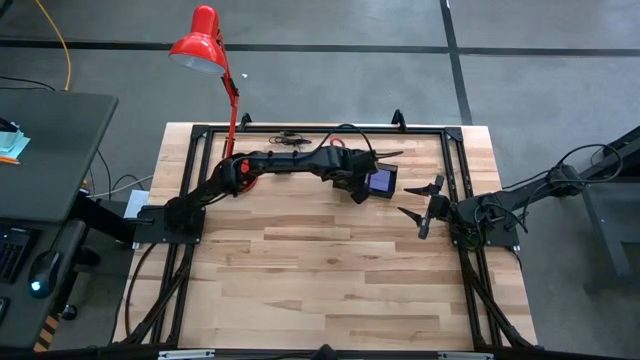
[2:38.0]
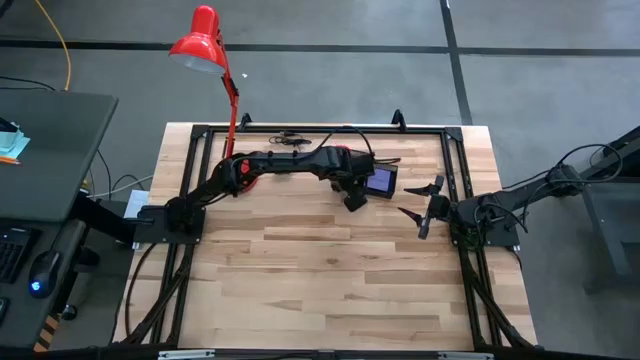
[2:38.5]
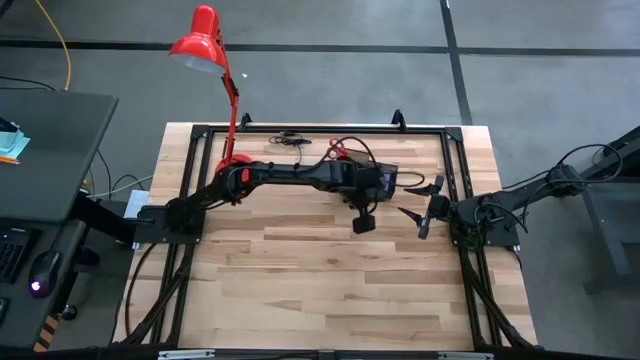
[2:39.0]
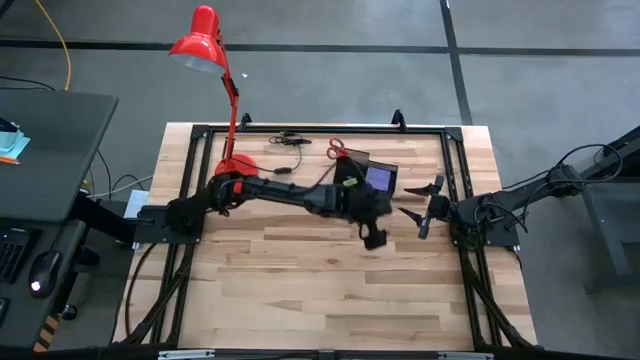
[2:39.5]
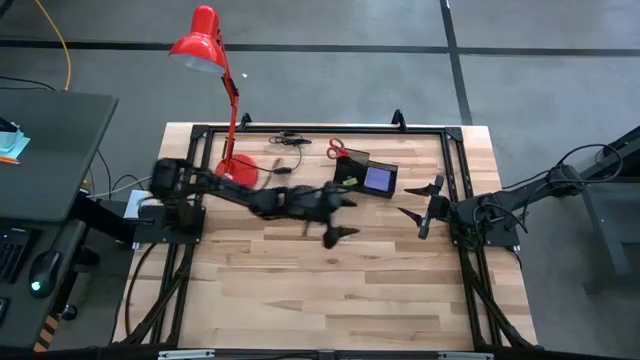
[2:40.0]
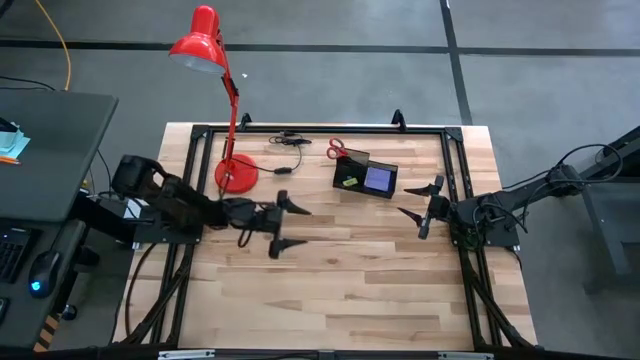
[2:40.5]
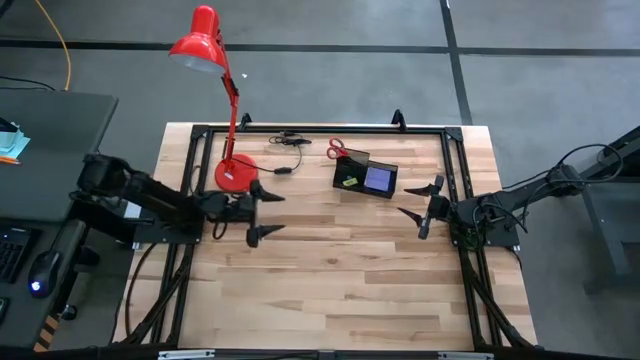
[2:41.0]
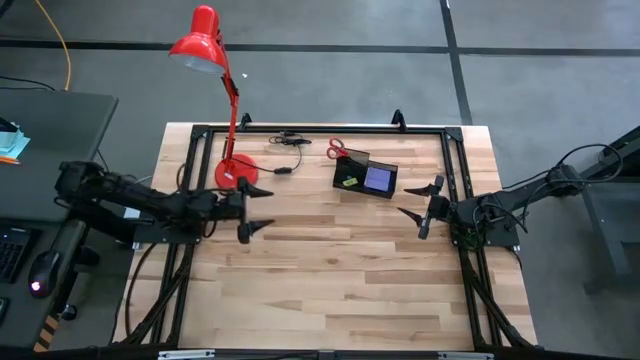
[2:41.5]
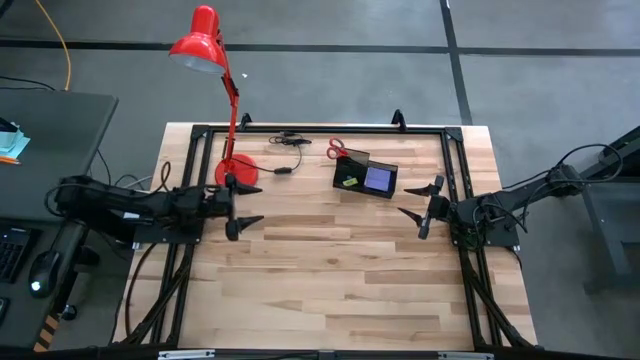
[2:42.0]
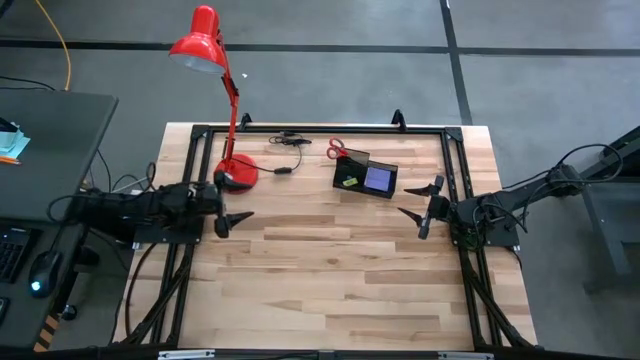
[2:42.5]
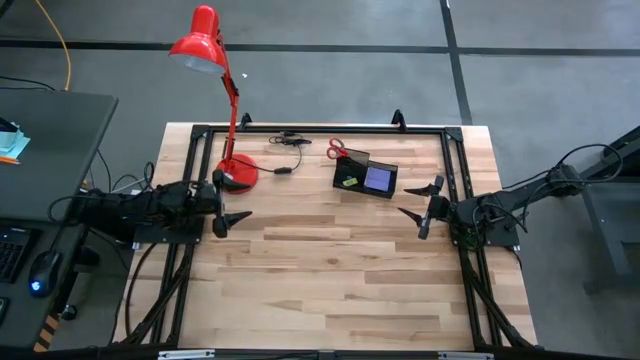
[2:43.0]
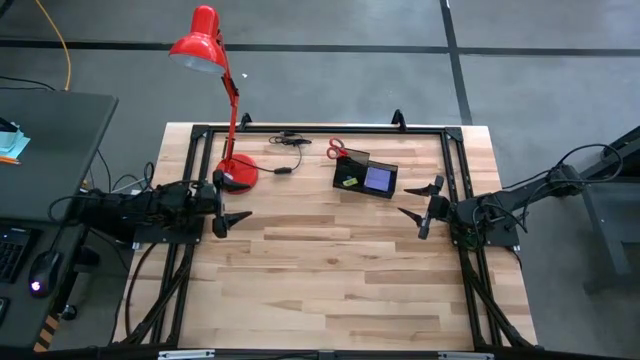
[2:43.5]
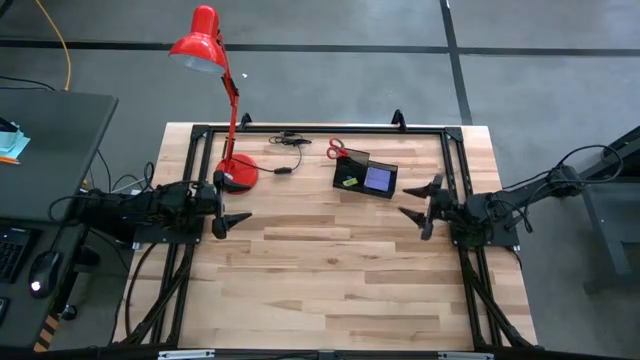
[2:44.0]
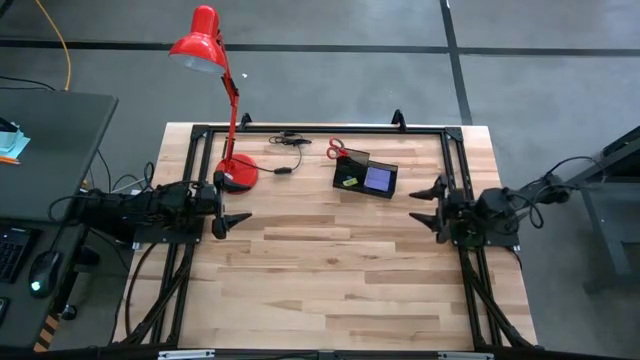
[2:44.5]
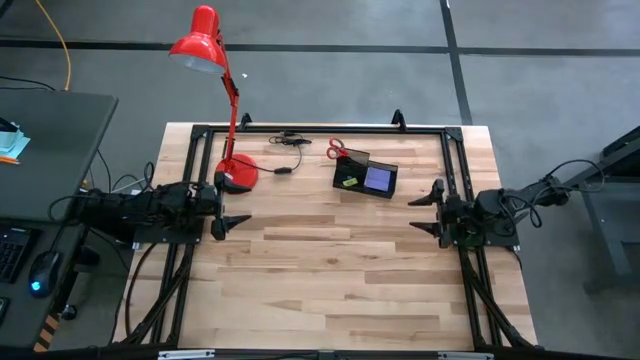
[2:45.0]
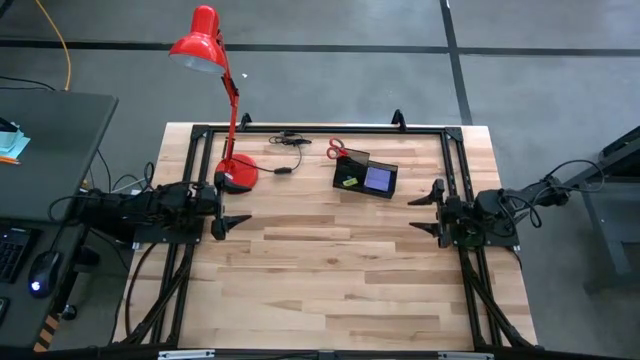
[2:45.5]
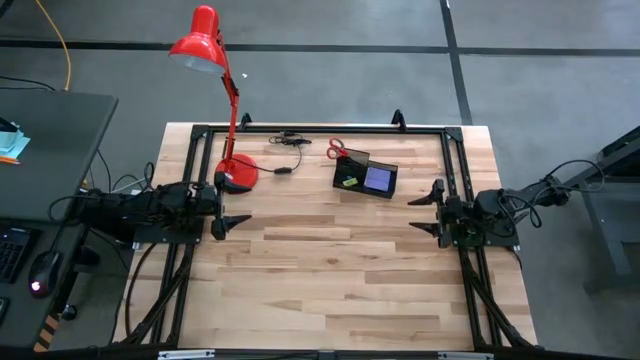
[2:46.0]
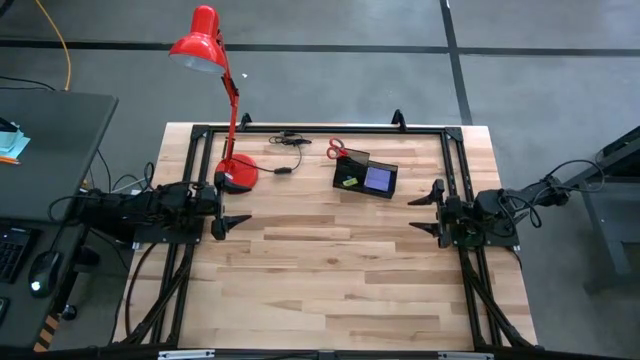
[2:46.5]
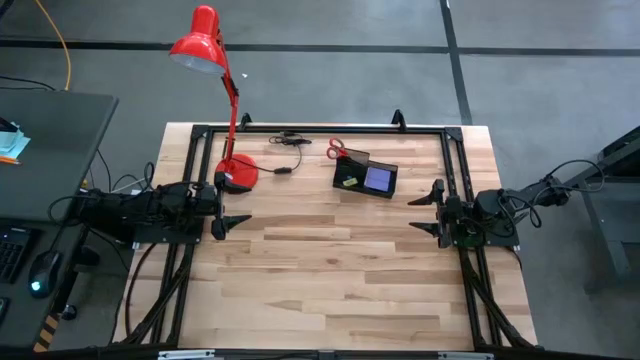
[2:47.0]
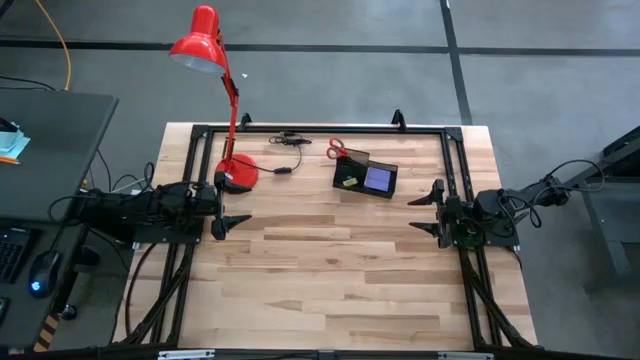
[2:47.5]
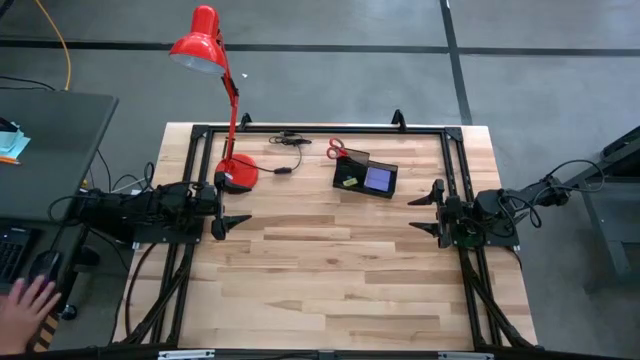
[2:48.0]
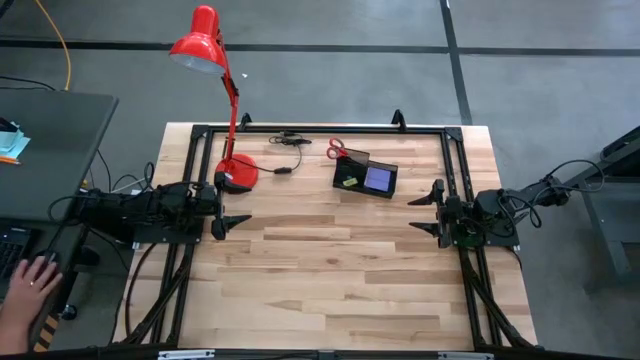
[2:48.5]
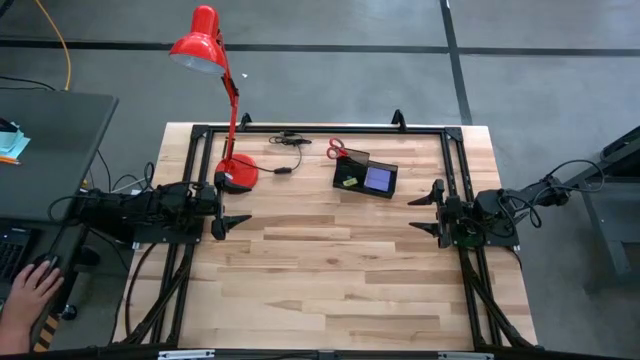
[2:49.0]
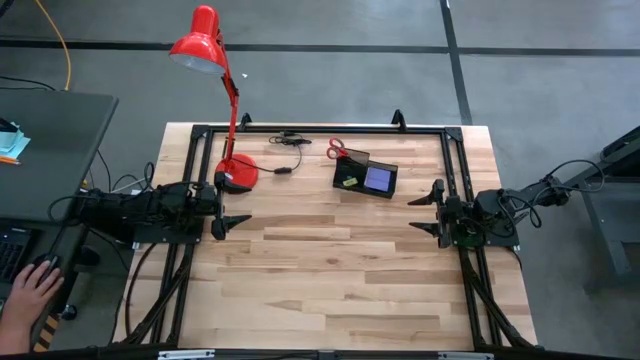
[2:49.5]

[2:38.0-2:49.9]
Task: Pick and place office supplies into organizer
Return to Home Position

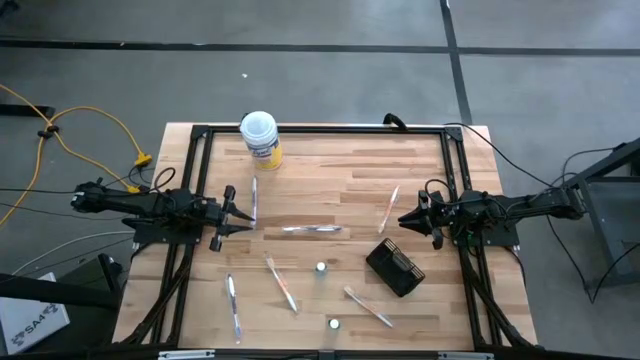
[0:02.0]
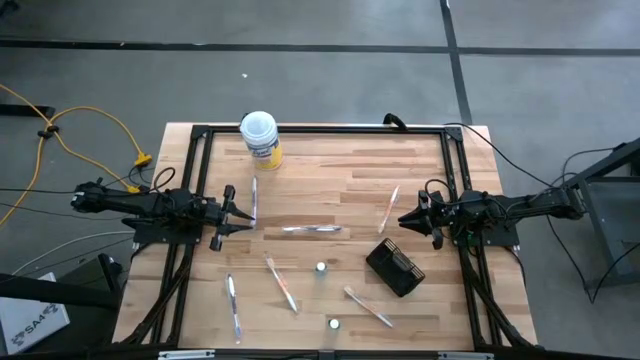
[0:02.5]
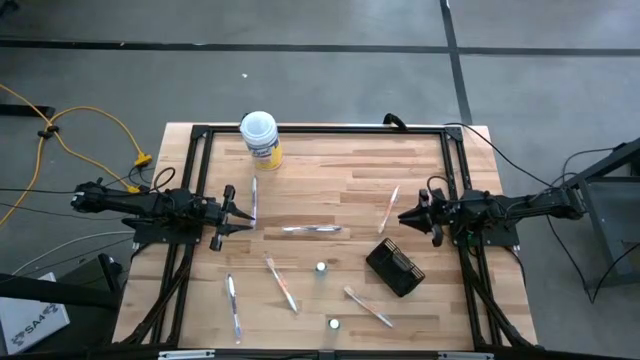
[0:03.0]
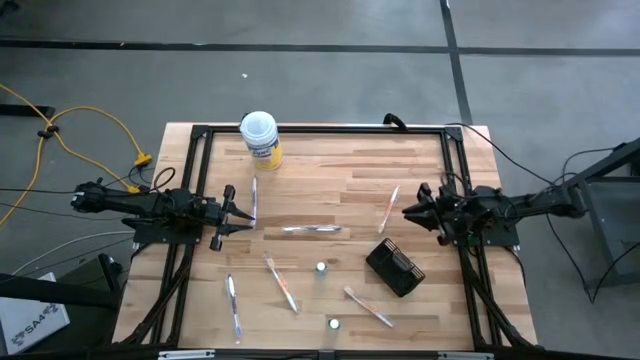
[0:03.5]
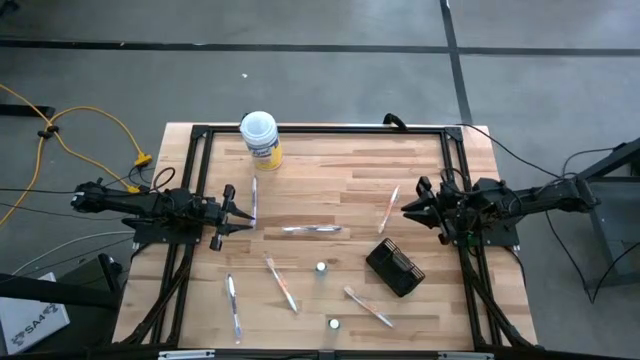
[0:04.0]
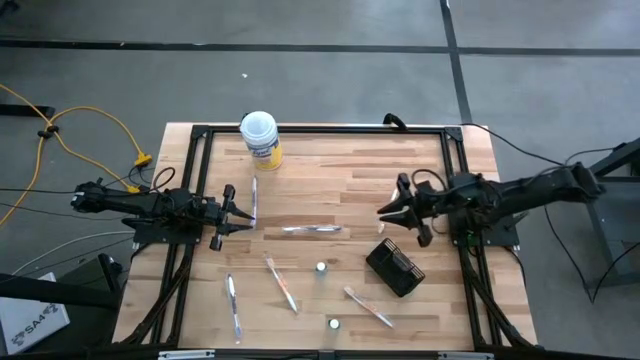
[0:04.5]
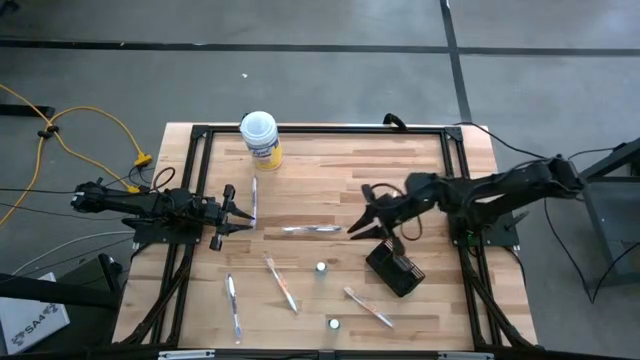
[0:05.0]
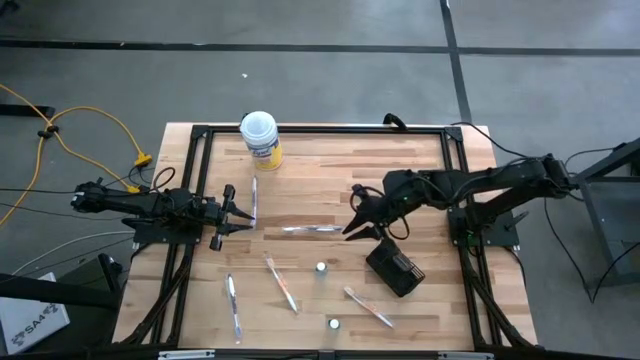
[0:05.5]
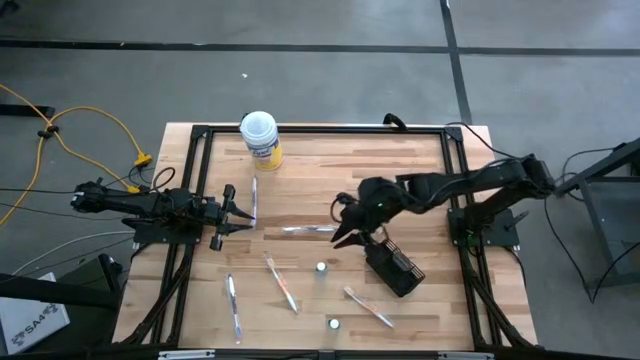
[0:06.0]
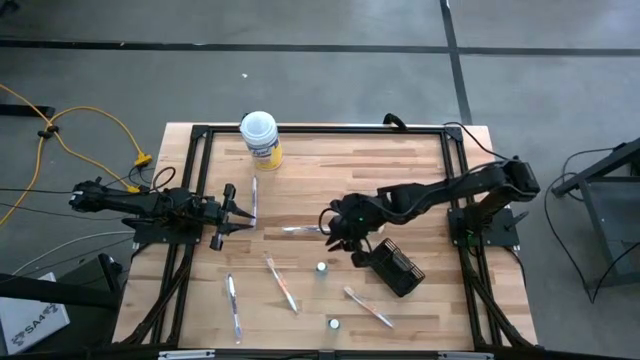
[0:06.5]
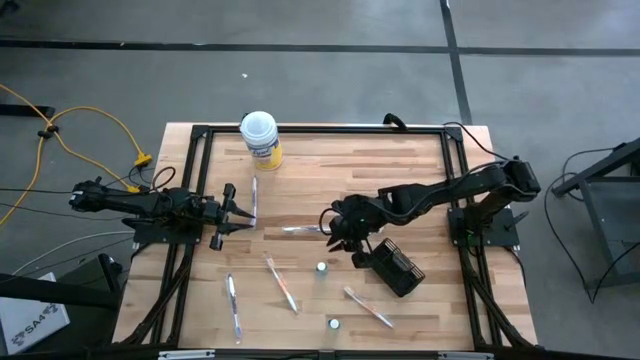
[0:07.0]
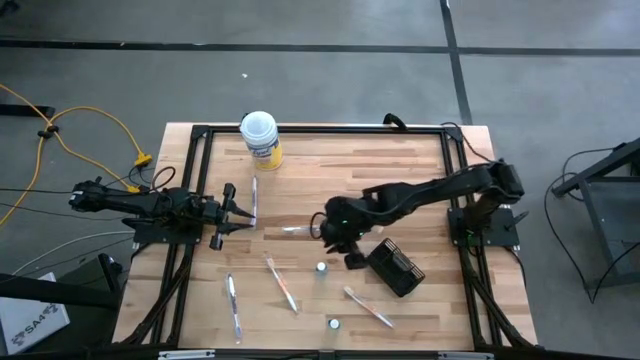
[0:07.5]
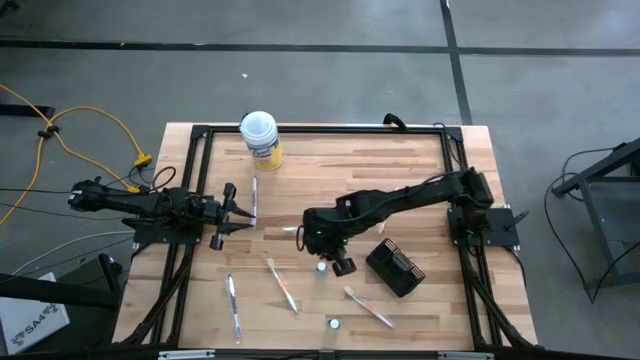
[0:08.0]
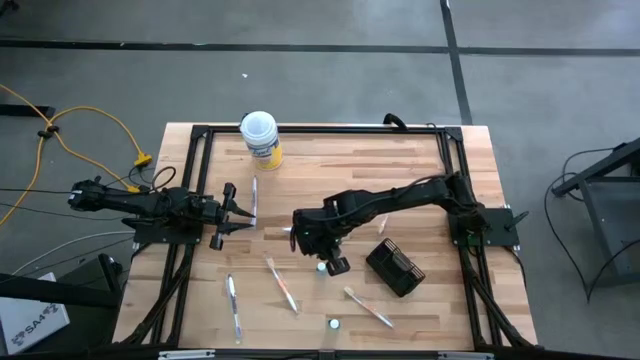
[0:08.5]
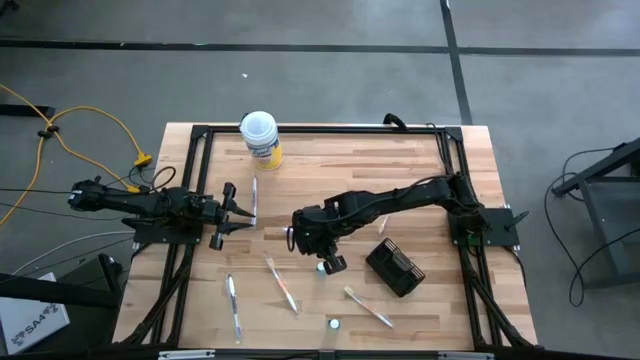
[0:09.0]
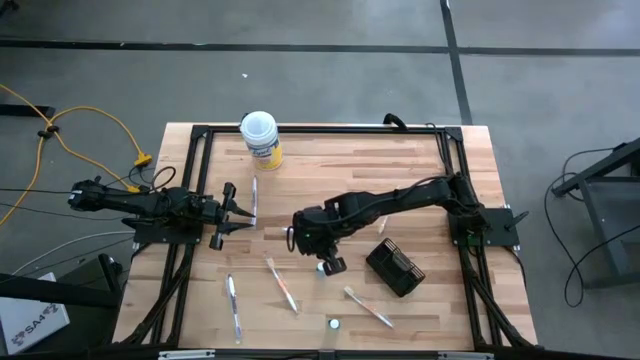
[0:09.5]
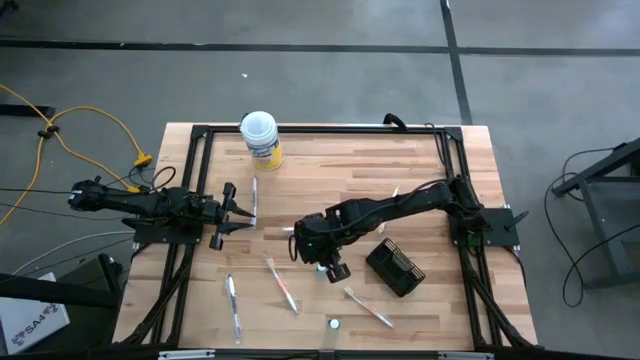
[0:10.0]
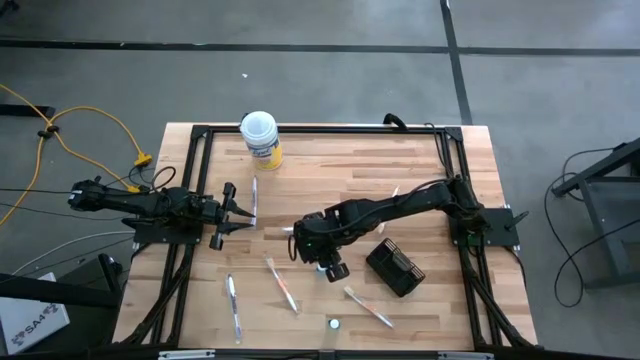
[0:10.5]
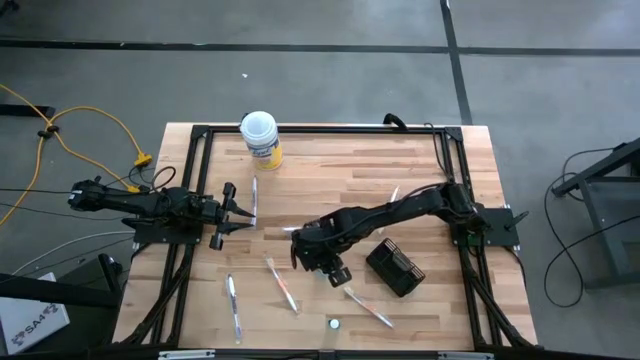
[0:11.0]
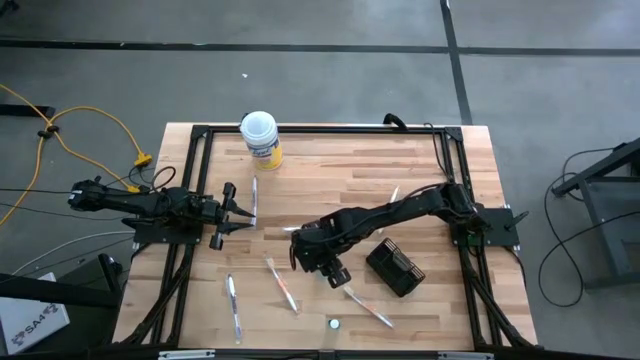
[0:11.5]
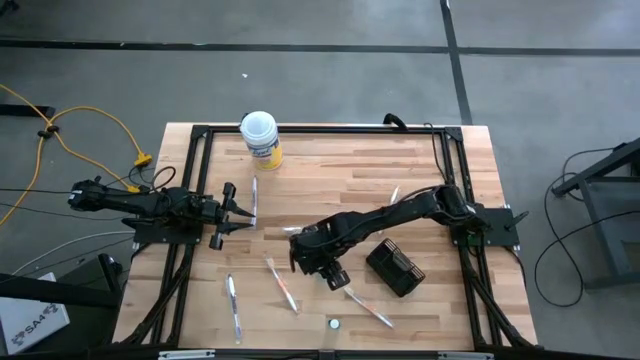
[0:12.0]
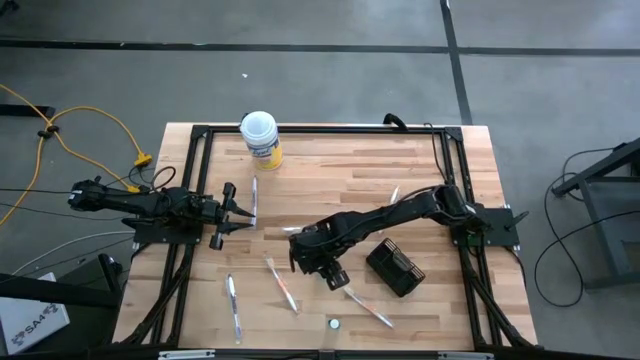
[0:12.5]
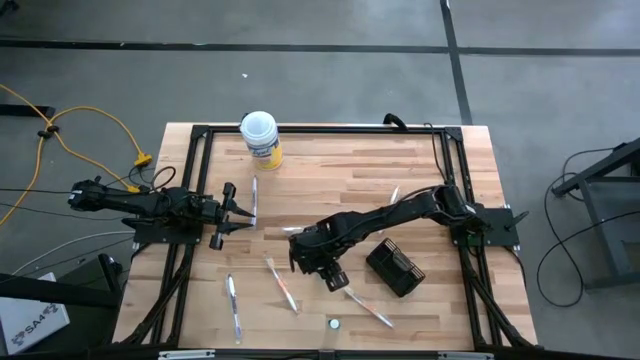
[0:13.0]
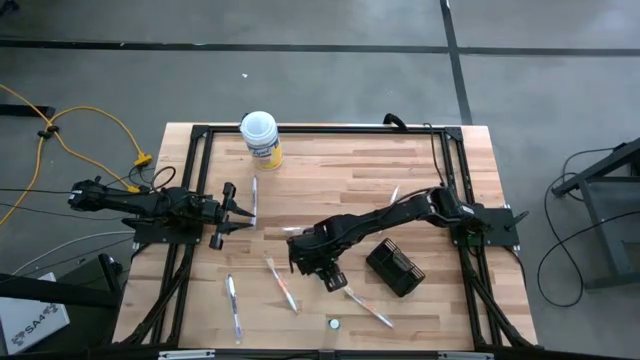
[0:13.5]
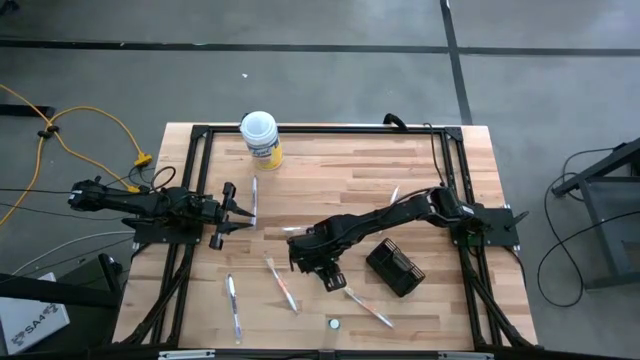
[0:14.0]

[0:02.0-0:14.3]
Task: Pick & Place toothbrushing station
Put the top blue mouthwash into the wire organizer
